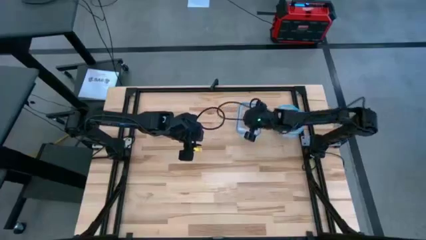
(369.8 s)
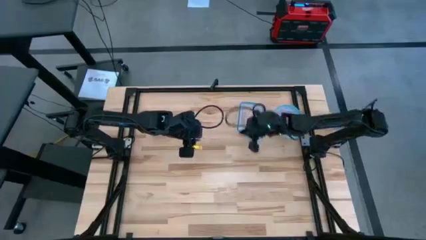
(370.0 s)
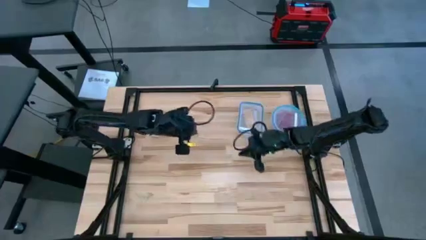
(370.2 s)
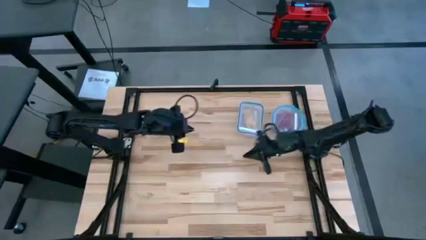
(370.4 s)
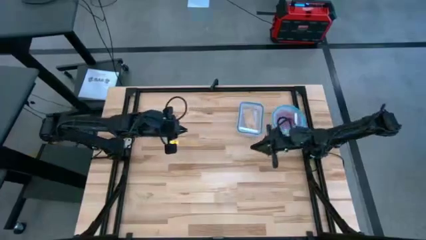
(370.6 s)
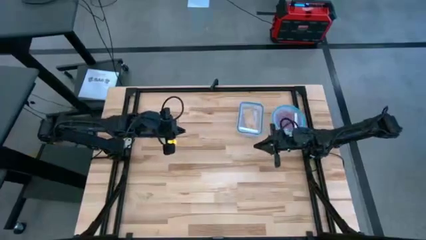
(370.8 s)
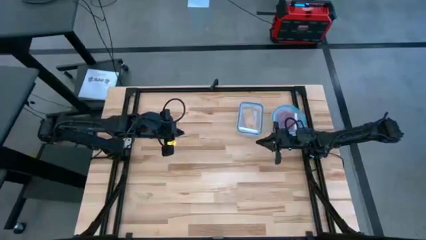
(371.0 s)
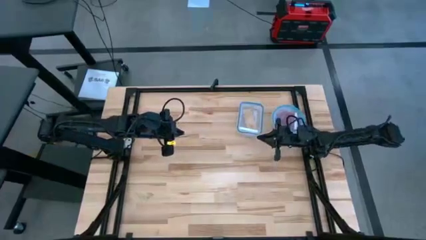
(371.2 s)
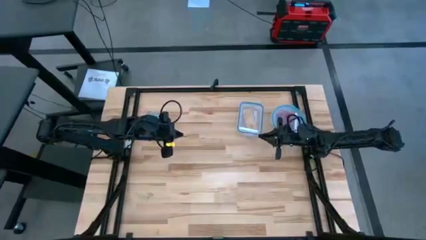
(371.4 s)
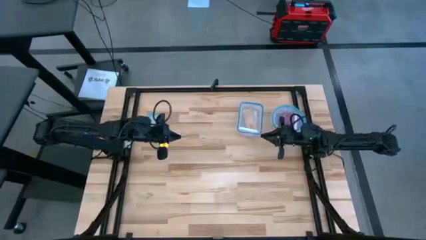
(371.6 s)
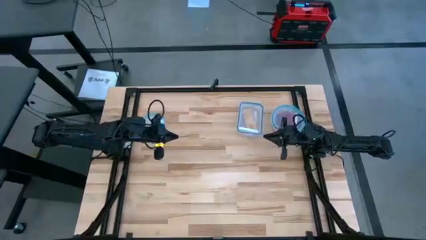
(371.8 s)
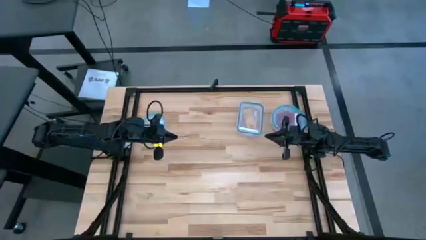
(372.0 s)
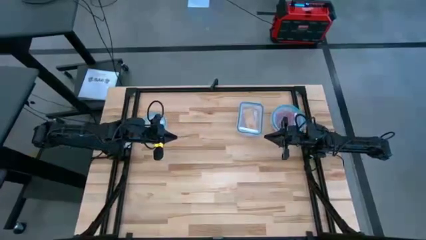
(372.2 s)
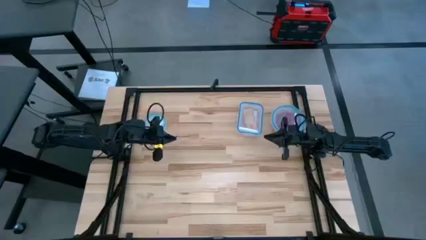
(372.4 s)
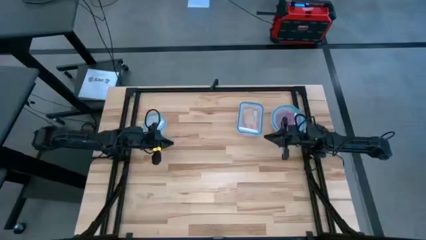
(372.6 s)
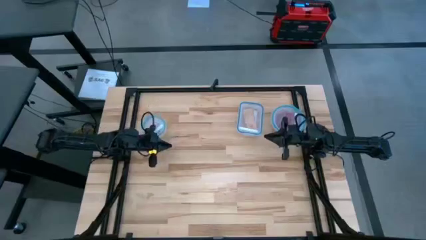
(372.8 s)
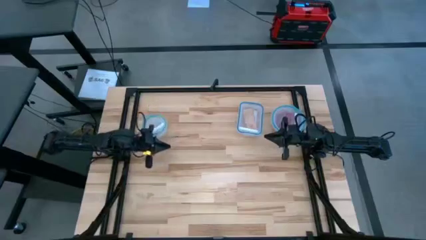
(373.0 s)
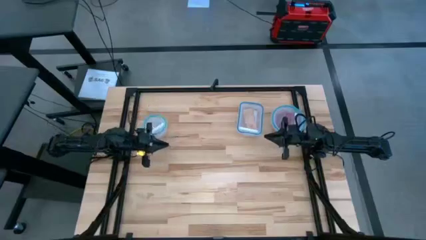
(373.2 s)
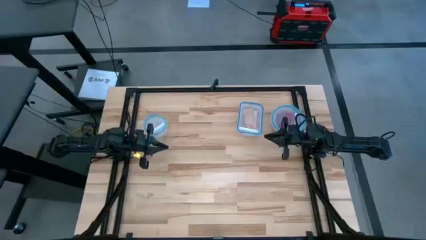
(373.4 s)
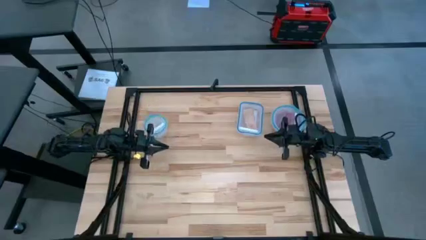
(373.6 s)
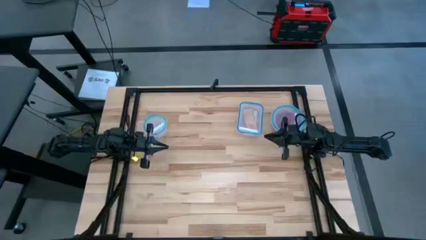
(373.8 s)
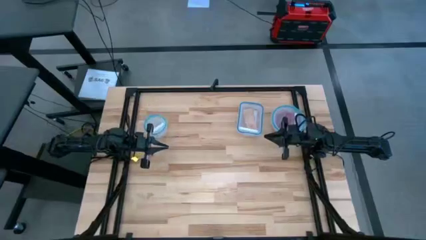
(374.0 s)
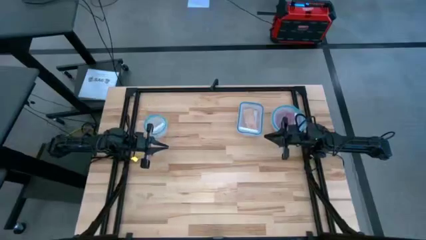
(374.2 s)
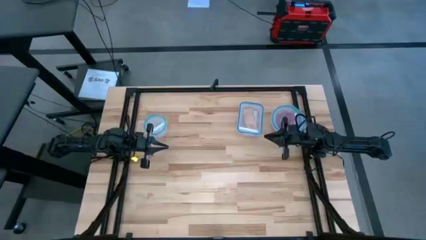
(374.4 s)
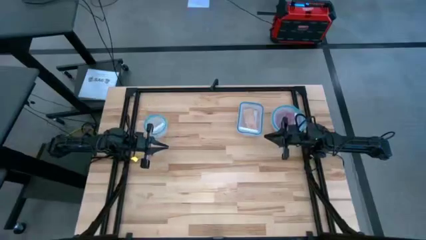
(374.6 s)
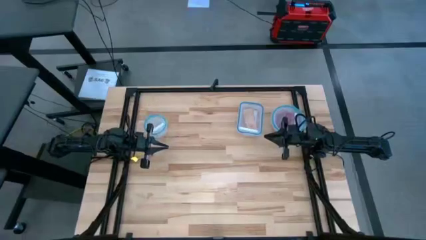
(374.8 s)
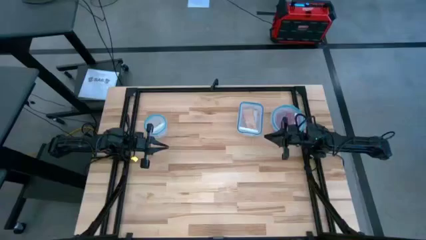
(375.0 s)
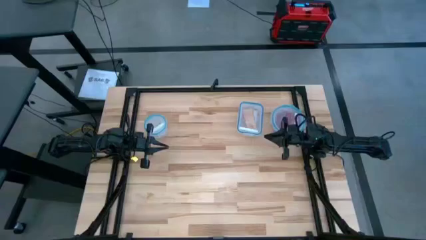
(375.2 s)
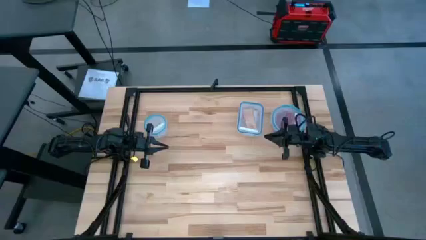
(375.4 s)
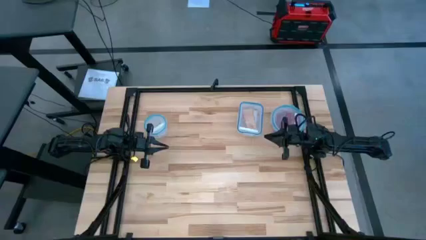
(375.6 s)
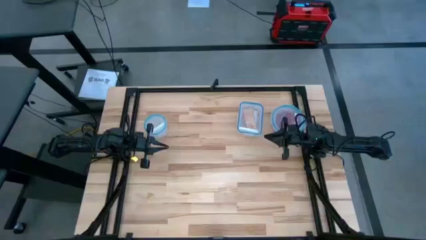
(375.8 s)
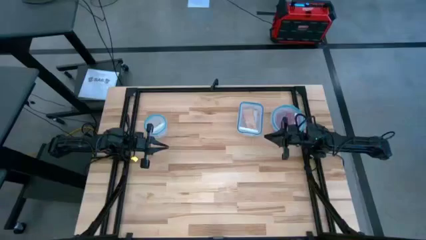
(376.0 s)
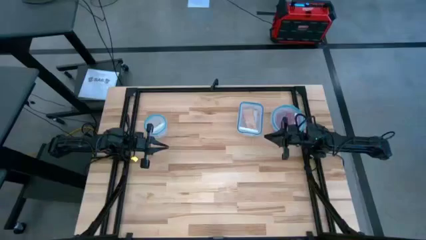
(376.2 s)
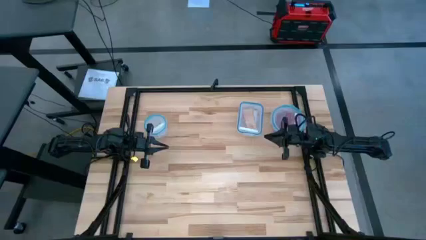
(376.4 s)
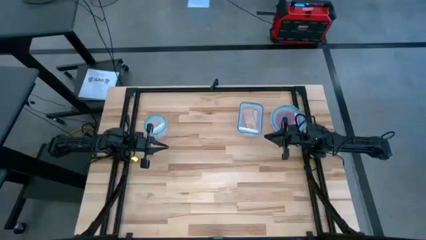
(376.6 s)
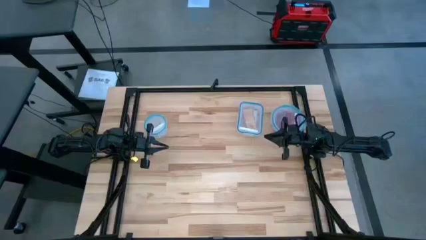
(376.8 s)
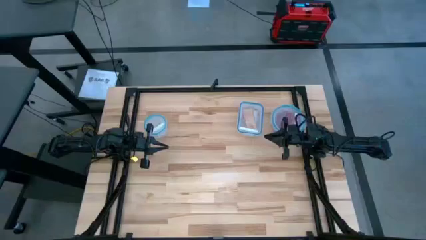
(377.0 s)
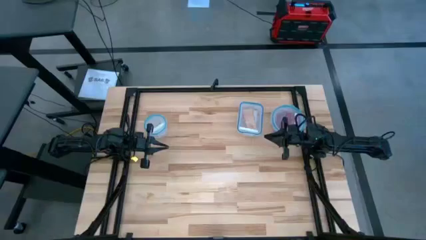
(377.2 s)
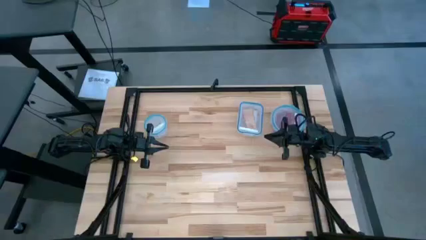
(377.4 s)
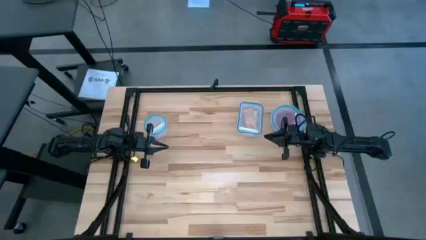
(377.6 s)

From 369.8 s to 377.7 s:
Task: Sort candy
Return to Home Position

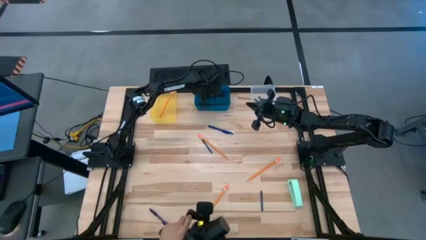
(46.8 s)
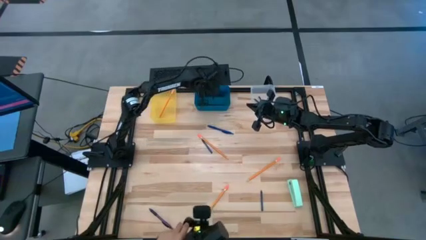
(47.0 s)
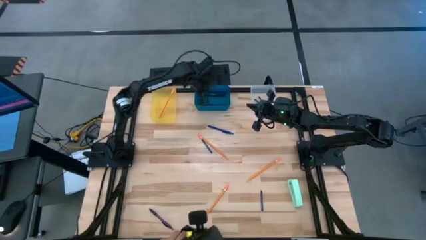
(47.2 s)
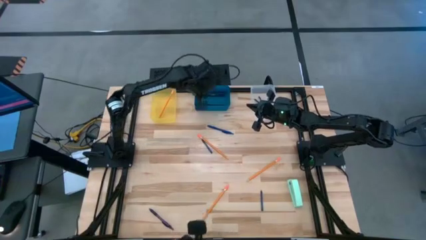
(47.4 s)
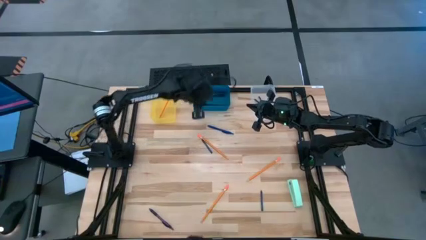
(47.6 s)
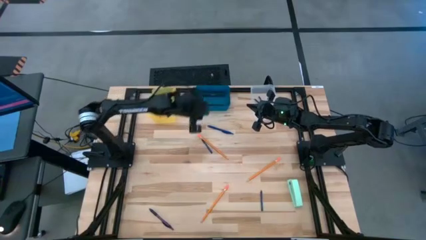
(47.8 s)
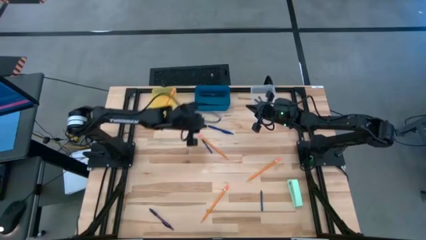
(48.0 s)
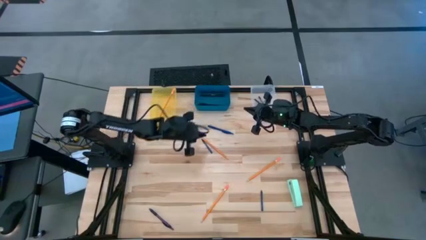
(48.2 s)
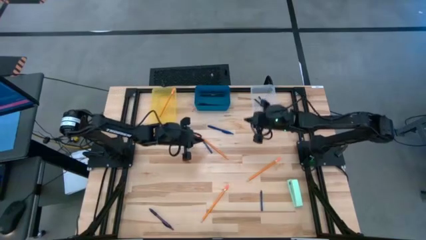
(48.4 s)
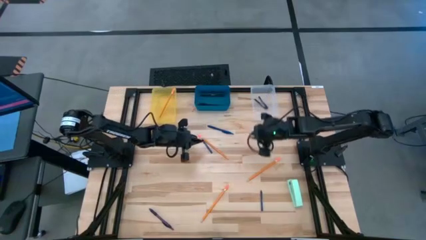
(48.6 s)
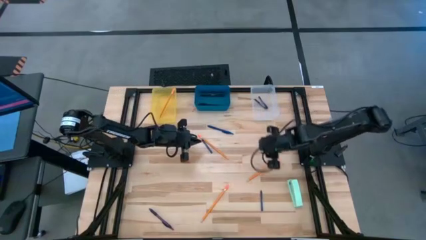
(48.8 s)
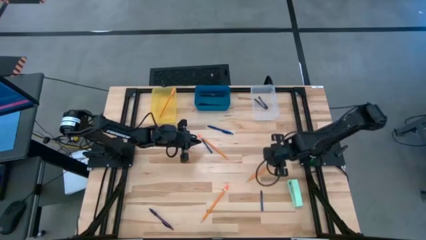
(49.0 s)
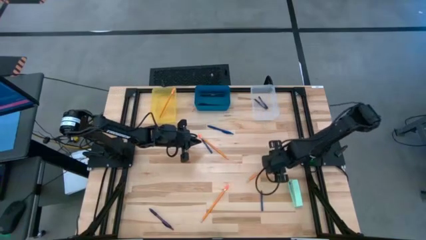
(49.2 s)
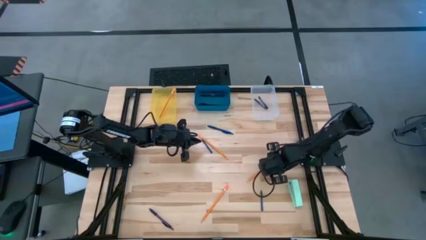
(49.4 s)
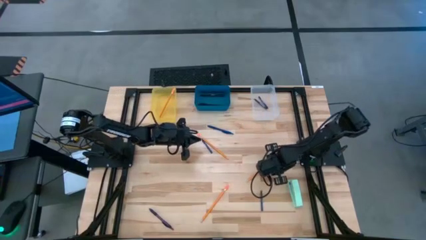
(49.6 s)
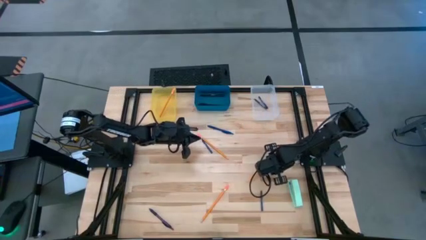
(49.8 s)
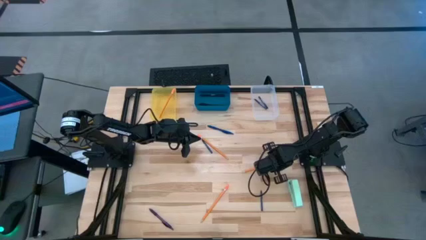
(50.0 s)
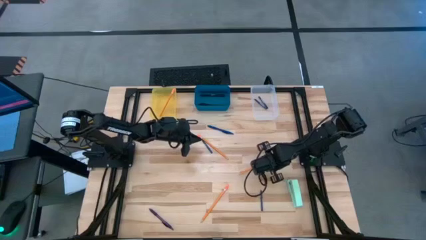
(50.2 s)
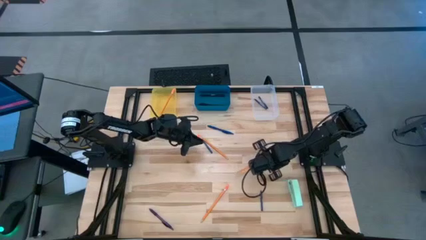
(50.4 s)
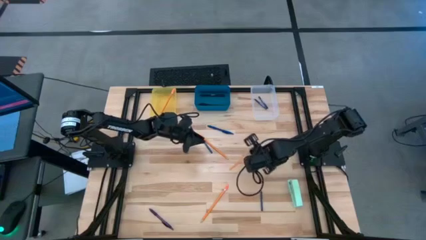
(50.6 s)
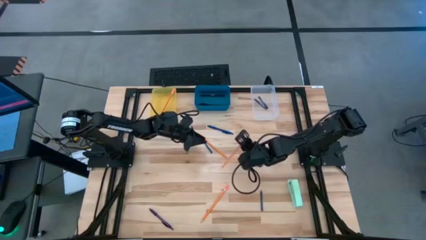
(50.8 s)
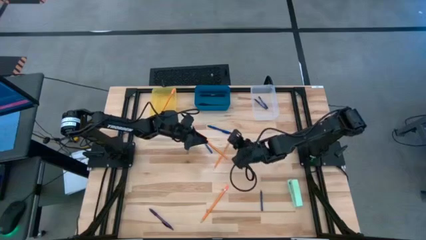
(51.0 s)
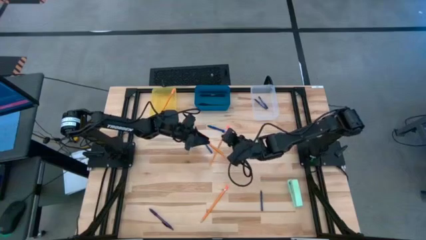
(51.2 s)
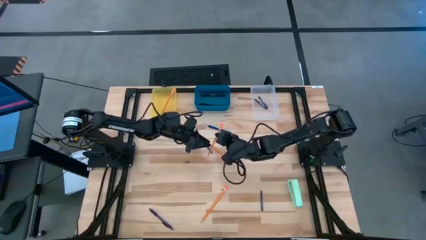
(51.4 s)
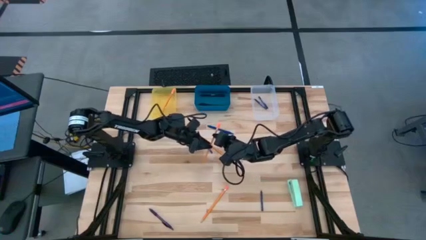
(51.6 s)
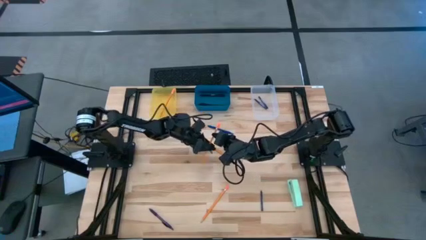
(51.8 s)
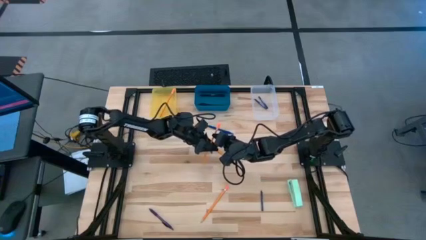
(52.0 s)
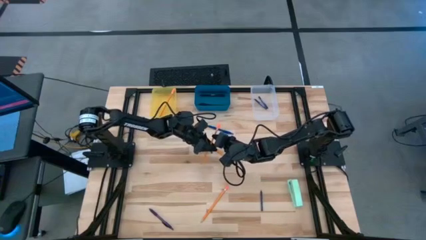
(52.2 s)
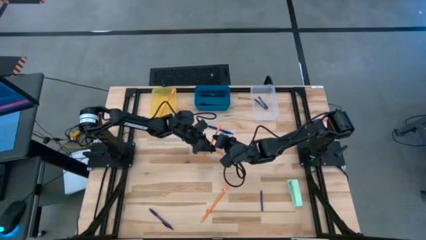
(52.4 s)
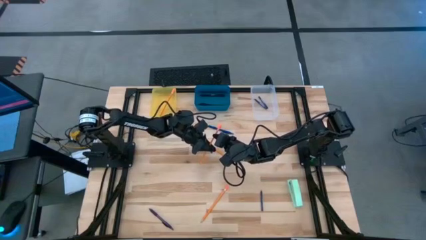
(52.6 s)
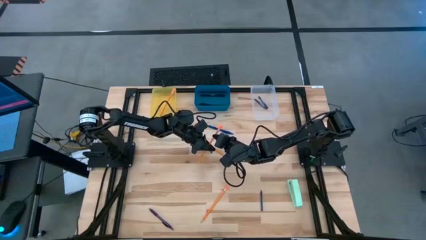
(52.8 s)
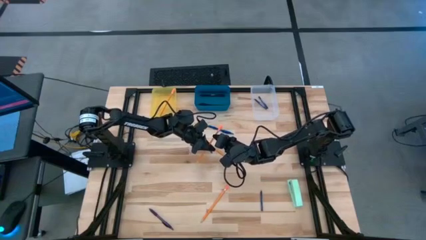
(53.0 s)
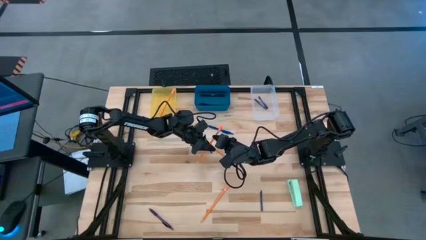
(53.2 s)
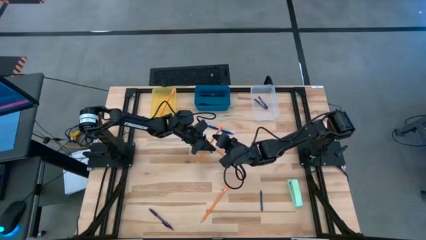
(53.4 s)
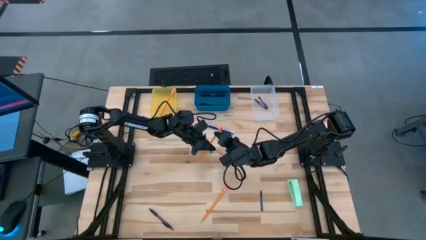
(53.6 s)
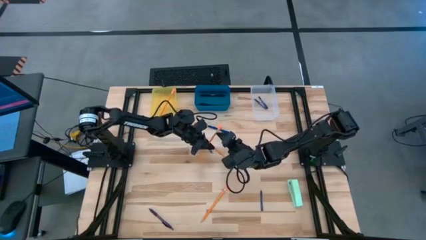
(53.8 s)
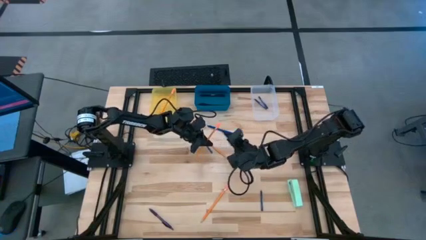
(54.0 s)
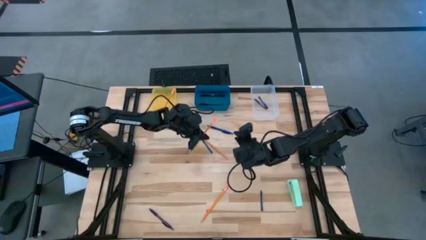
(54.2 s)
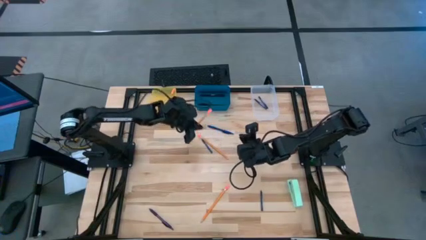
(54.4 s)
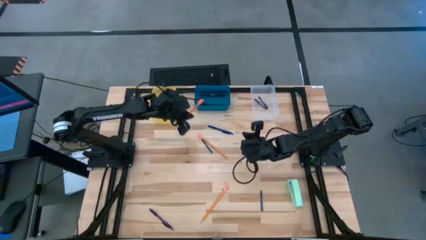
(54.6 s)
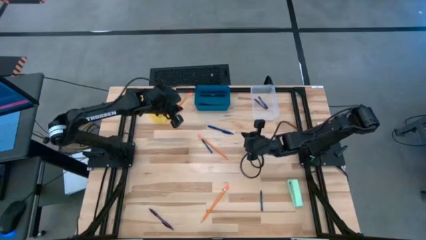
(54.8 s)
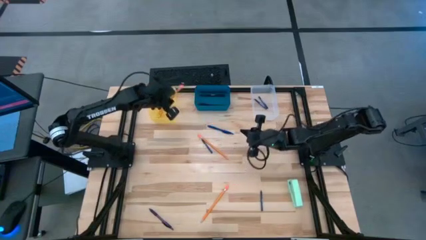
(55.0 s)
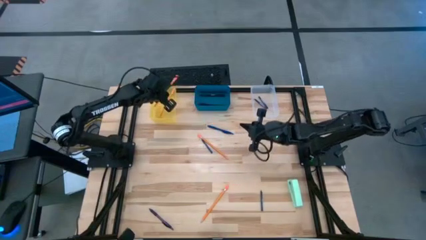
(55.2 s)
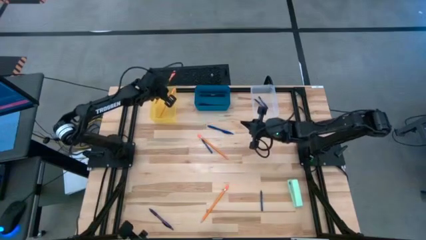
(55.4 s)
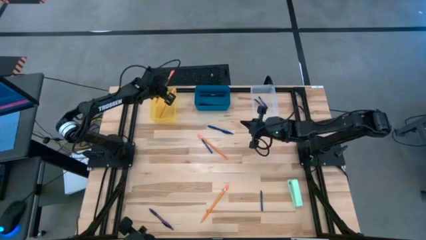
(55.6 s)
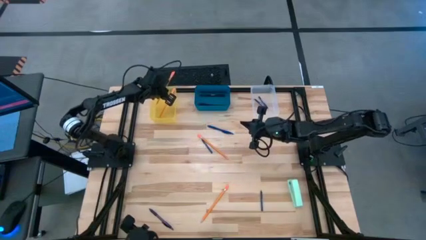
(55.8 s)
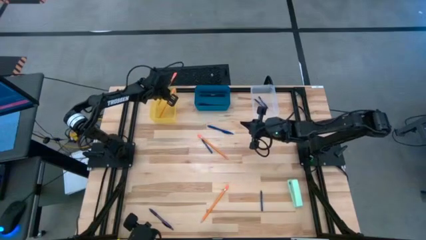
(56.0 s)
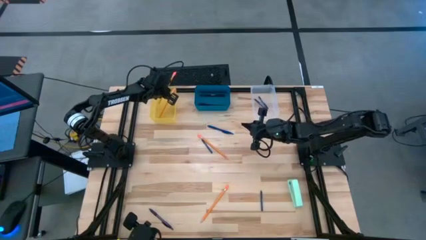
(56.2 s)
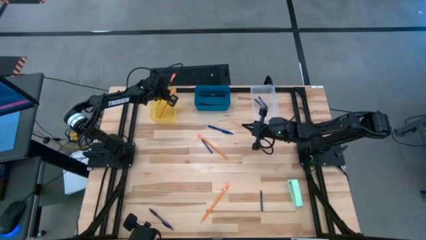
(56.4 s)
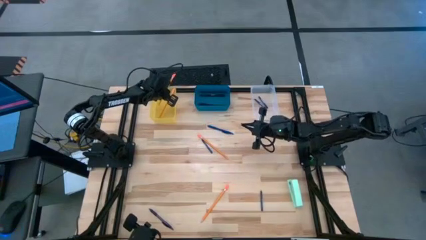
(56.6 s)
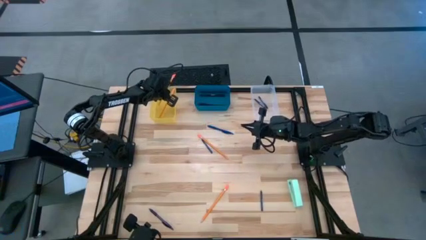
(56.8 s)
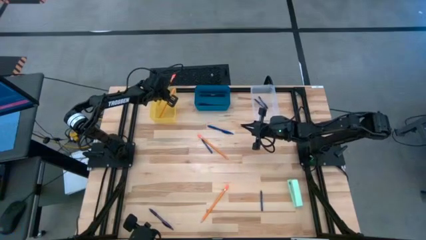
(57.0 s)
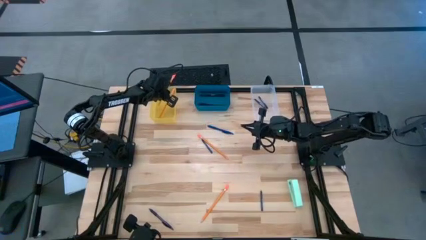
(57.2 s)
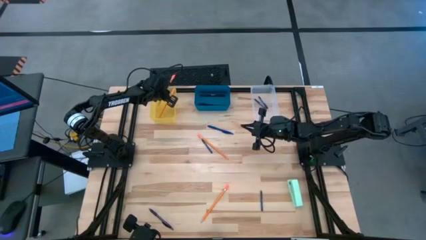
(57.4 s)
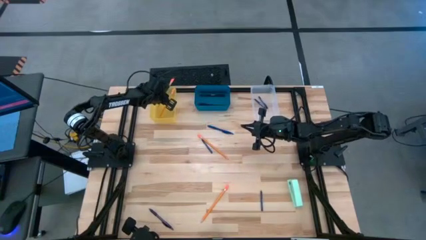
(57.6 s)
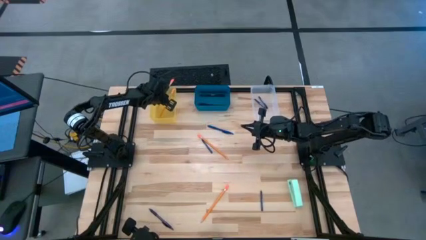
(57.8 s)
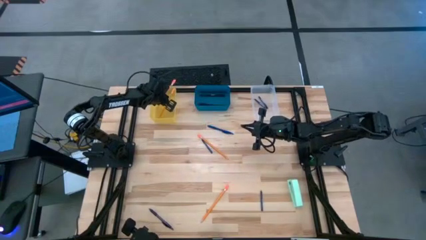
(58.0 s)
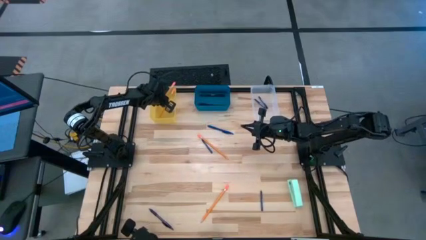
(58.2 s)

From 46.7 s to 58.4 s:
Task: Sort crayons/erasers/pens/pencils in bins
Put the orange pencil into the transparent yellow bin
